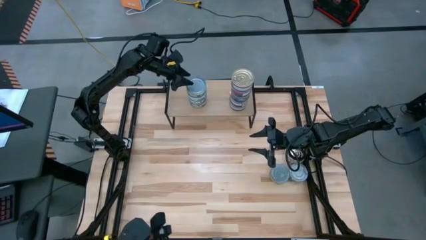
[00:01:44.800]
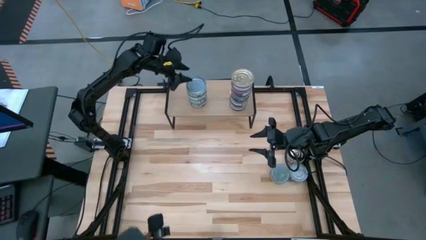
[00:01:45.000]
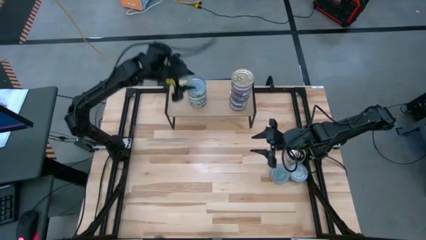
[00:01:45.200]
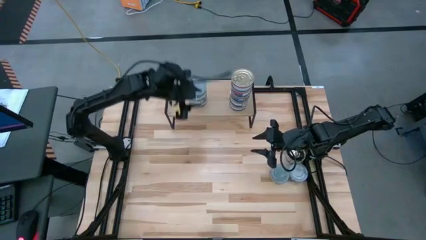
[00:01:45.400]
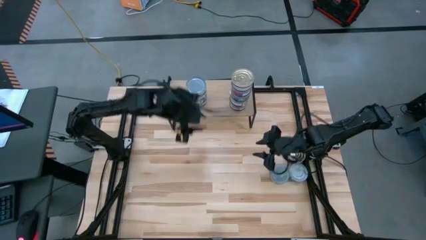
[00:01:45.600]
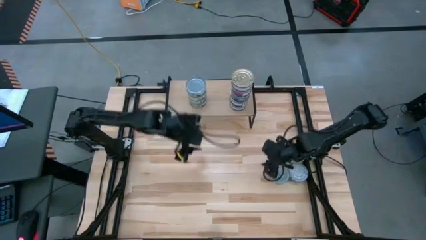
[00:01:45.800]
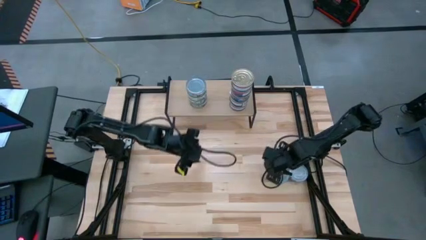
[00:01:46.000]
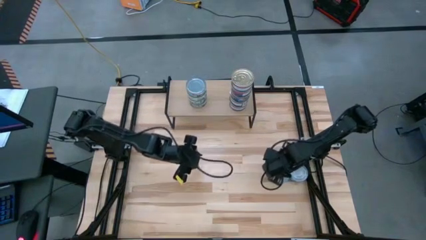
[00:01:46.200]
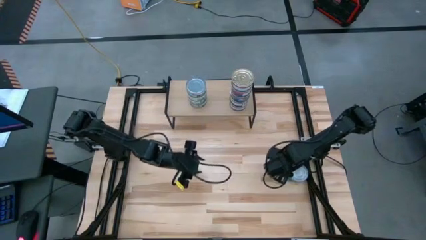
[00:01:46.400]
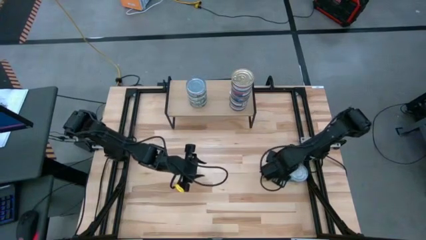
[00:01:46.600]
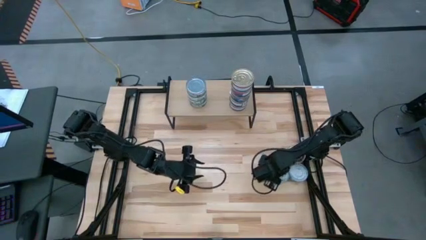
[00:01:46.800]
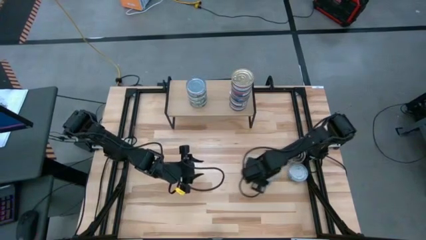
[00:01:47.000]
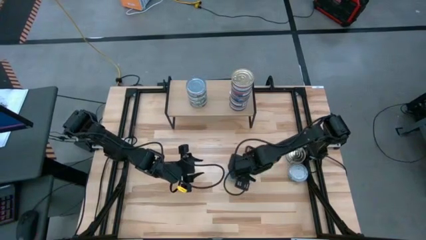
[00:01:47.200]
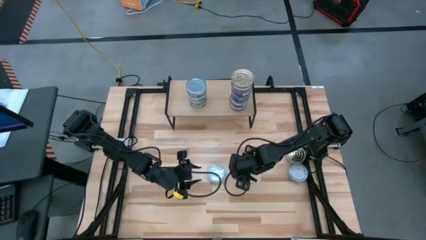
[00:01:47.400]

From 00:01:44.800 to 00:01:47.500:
Task: Stack canned seafood by type on shelf
Move the green tuna can to the center of the table

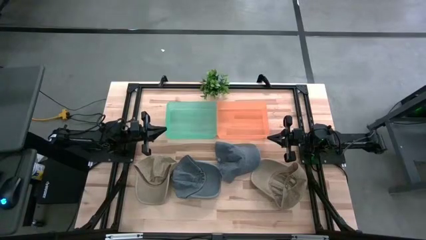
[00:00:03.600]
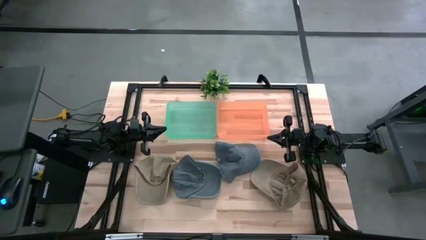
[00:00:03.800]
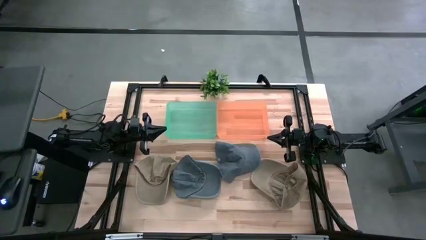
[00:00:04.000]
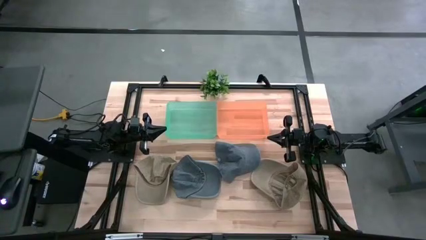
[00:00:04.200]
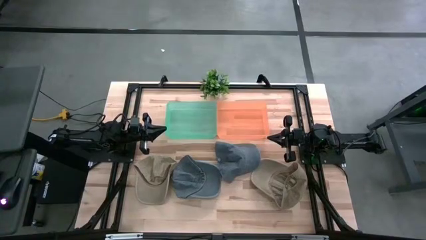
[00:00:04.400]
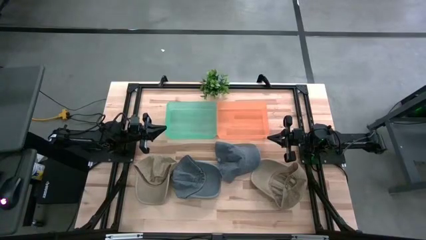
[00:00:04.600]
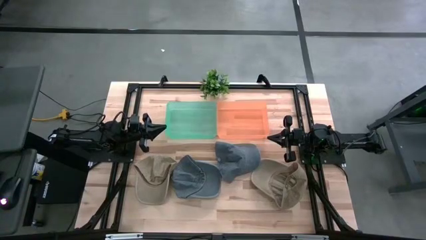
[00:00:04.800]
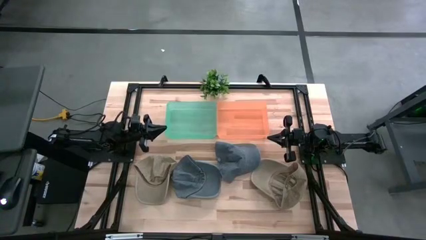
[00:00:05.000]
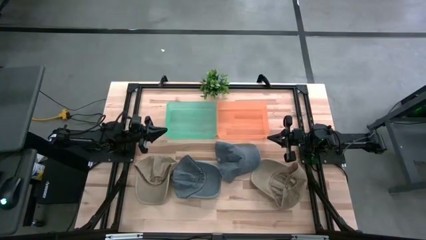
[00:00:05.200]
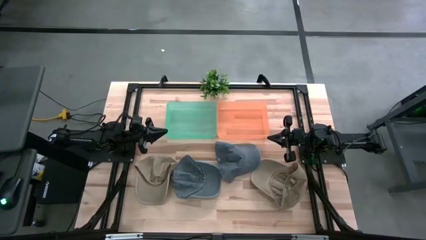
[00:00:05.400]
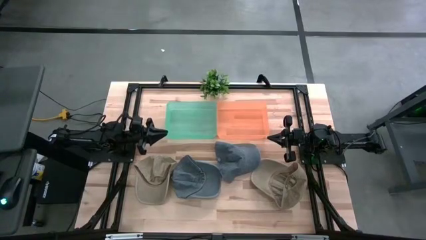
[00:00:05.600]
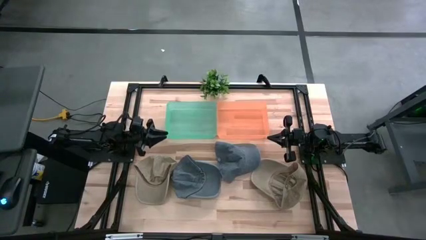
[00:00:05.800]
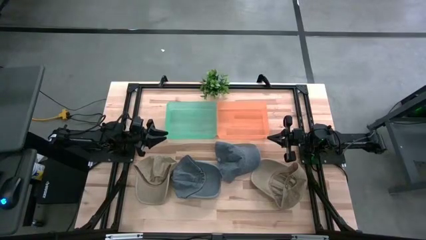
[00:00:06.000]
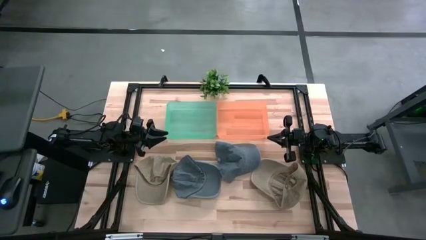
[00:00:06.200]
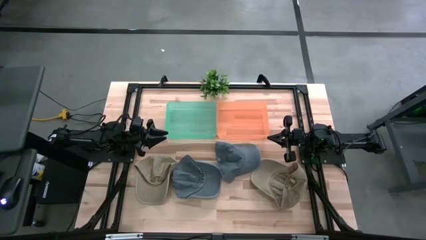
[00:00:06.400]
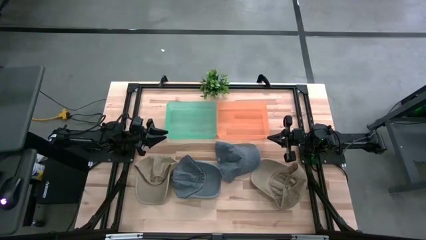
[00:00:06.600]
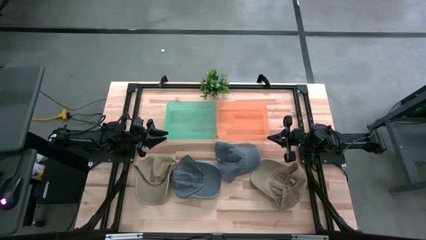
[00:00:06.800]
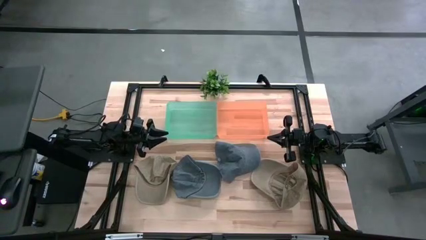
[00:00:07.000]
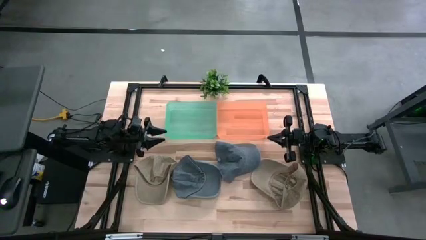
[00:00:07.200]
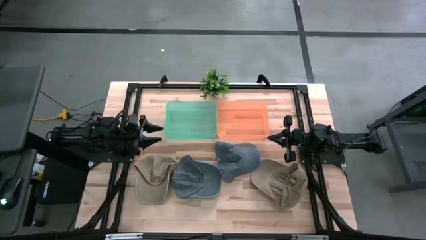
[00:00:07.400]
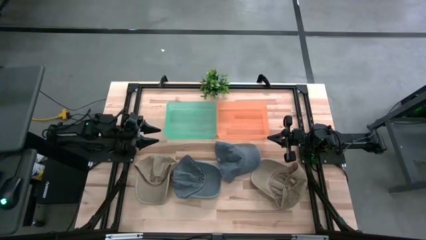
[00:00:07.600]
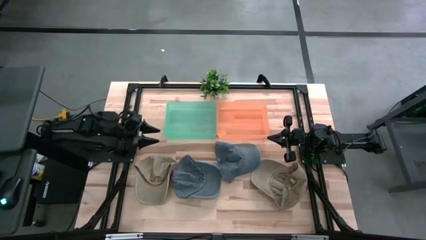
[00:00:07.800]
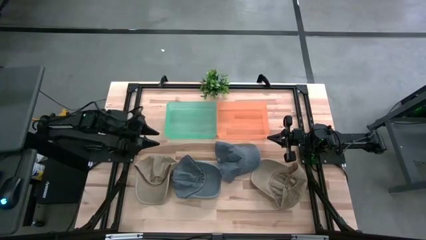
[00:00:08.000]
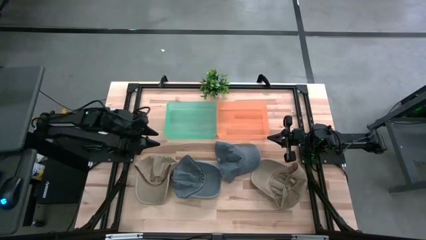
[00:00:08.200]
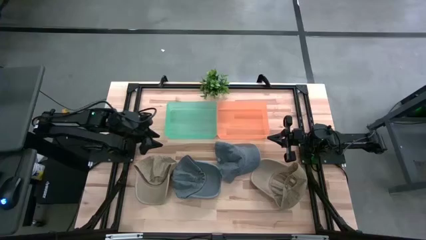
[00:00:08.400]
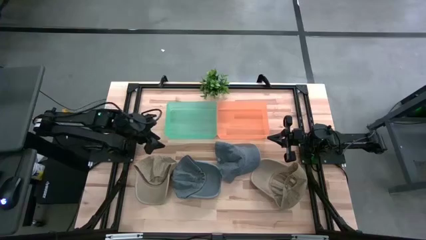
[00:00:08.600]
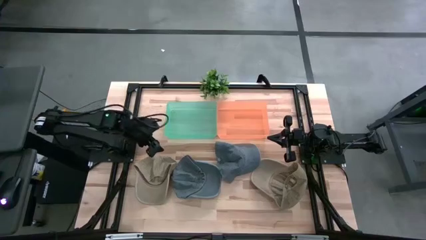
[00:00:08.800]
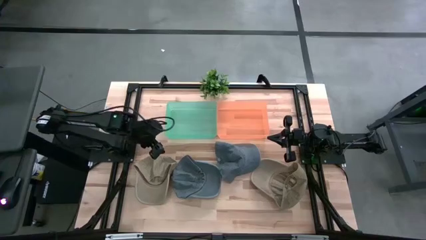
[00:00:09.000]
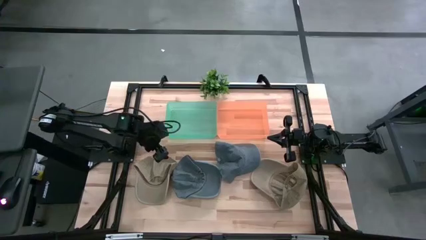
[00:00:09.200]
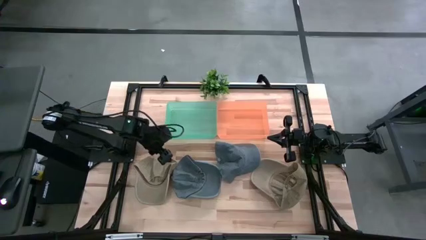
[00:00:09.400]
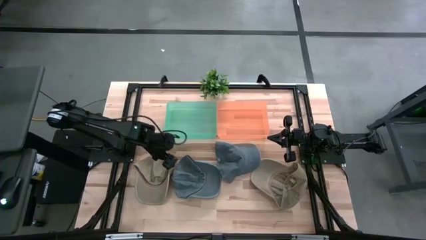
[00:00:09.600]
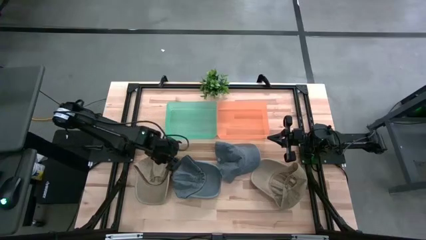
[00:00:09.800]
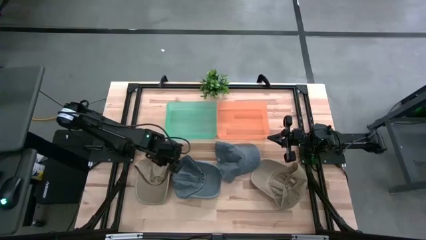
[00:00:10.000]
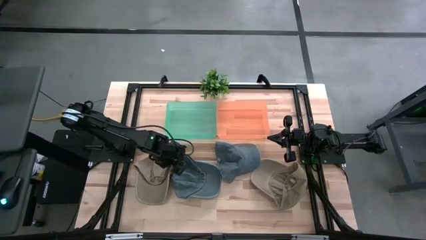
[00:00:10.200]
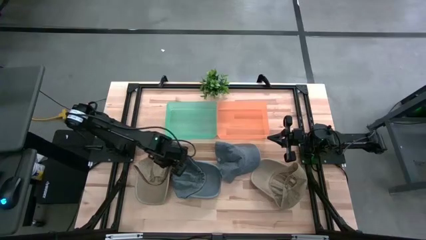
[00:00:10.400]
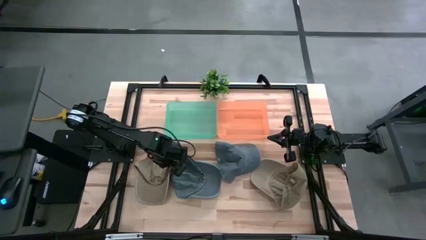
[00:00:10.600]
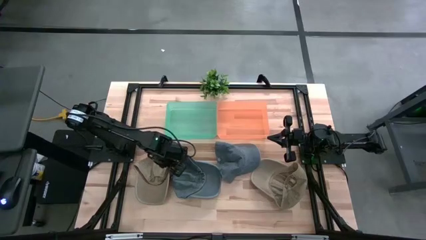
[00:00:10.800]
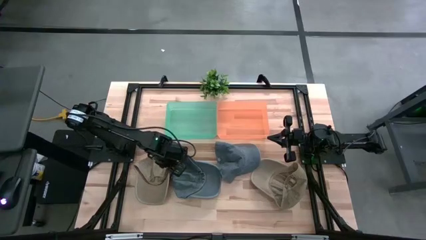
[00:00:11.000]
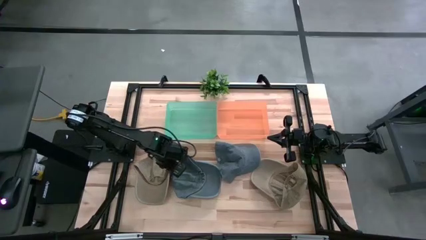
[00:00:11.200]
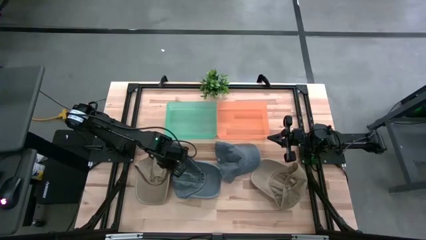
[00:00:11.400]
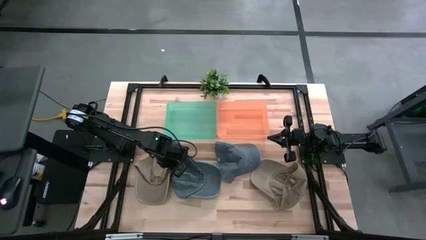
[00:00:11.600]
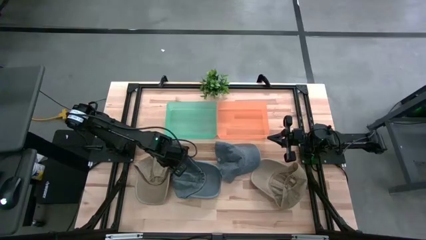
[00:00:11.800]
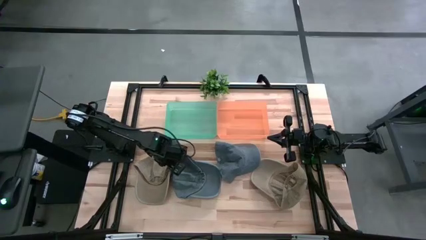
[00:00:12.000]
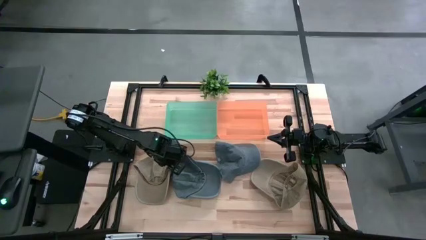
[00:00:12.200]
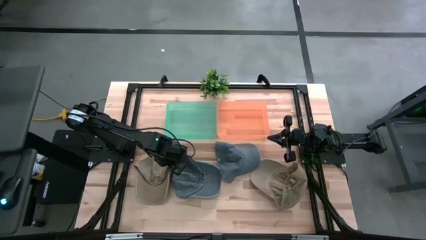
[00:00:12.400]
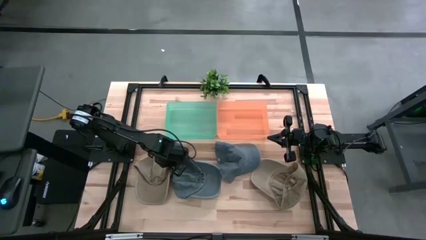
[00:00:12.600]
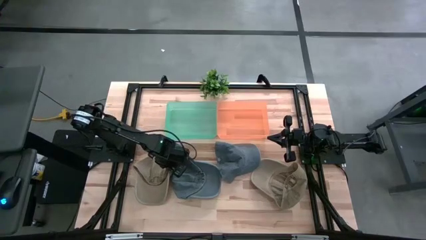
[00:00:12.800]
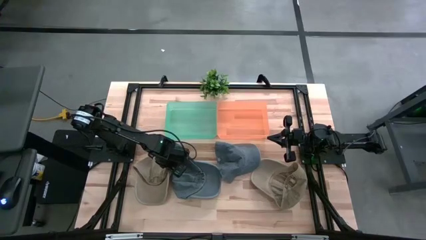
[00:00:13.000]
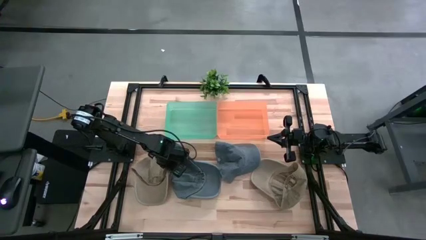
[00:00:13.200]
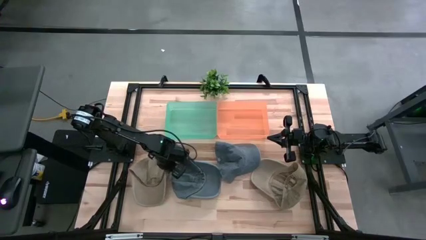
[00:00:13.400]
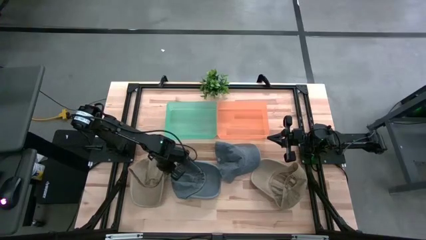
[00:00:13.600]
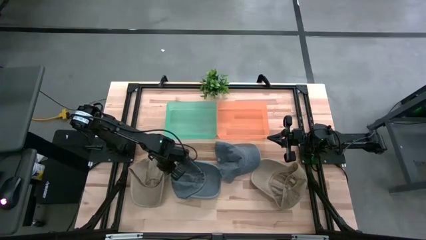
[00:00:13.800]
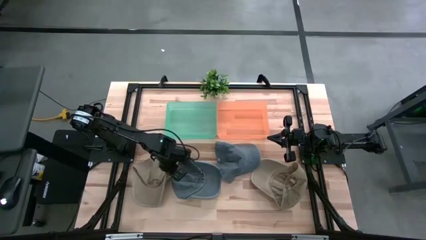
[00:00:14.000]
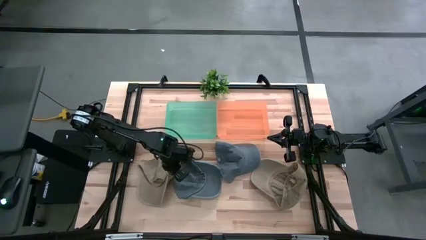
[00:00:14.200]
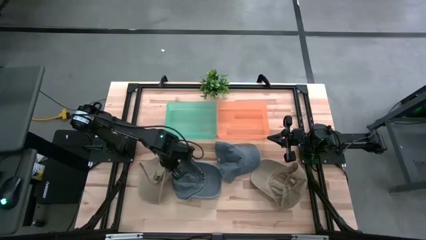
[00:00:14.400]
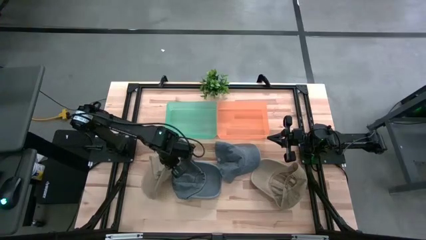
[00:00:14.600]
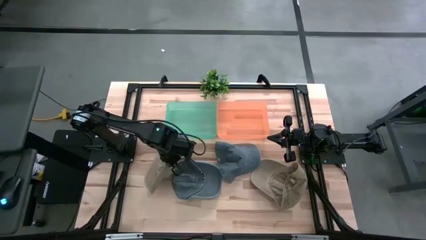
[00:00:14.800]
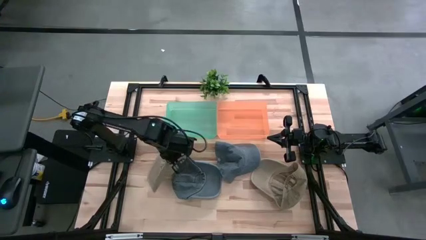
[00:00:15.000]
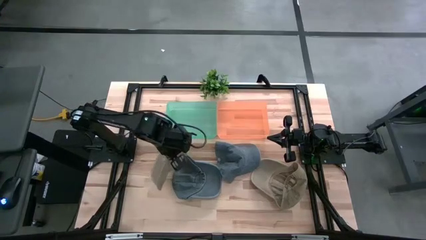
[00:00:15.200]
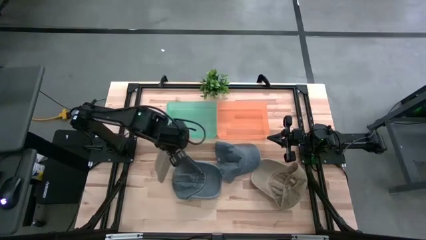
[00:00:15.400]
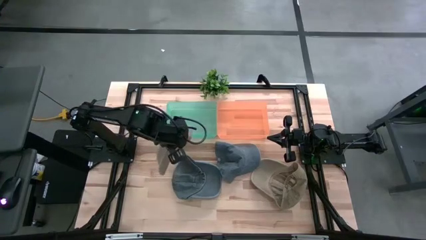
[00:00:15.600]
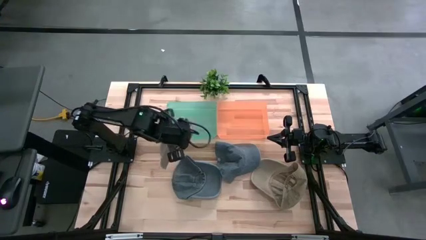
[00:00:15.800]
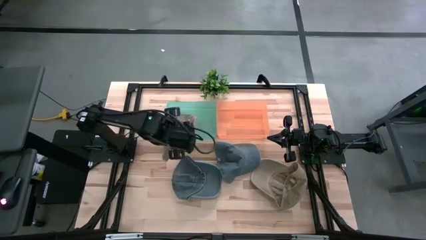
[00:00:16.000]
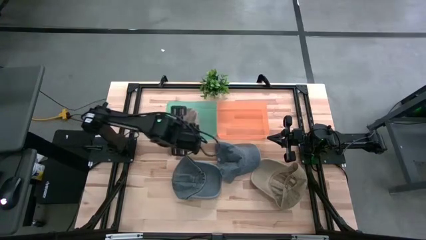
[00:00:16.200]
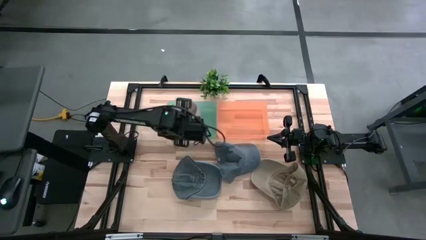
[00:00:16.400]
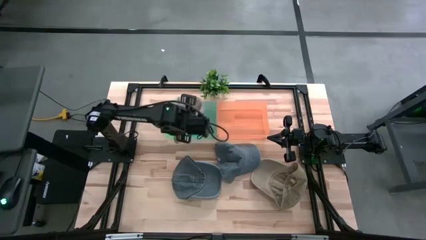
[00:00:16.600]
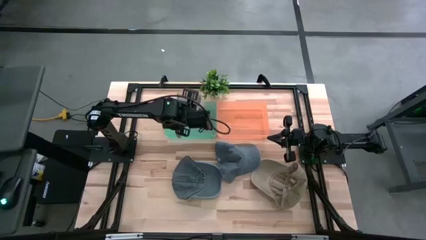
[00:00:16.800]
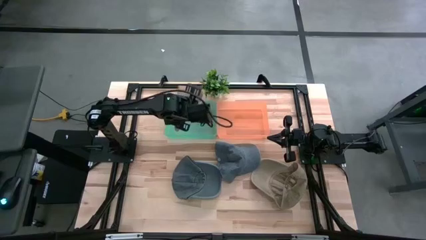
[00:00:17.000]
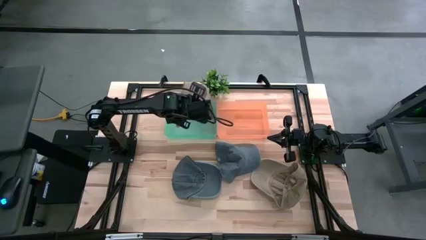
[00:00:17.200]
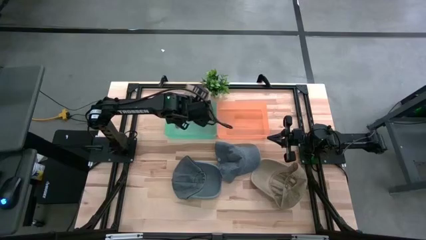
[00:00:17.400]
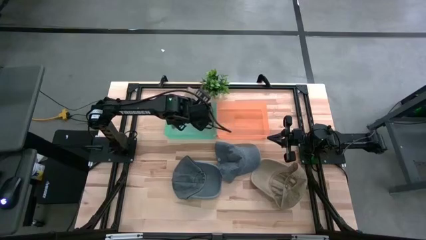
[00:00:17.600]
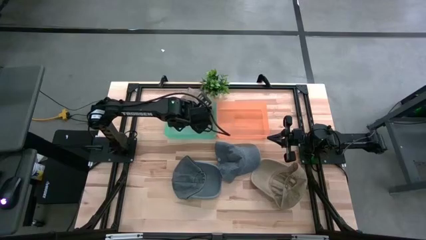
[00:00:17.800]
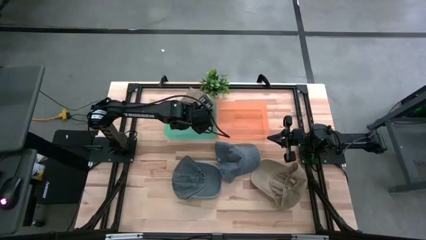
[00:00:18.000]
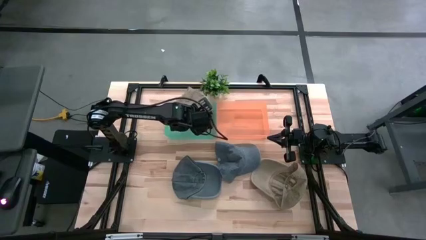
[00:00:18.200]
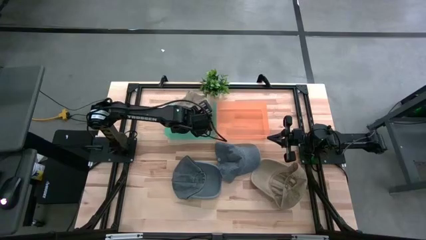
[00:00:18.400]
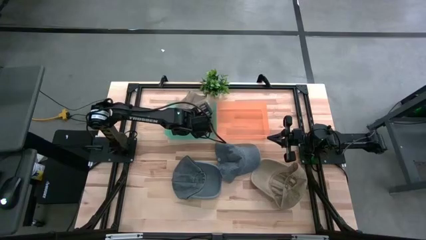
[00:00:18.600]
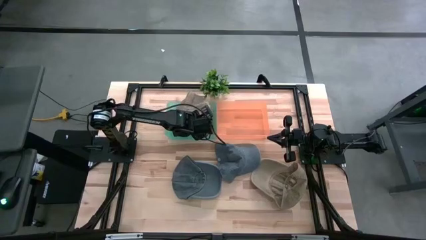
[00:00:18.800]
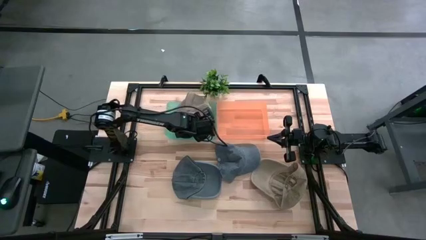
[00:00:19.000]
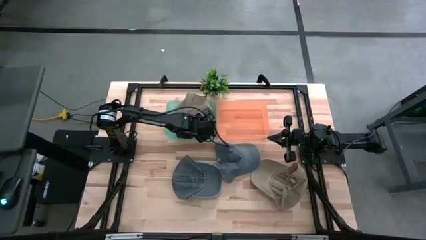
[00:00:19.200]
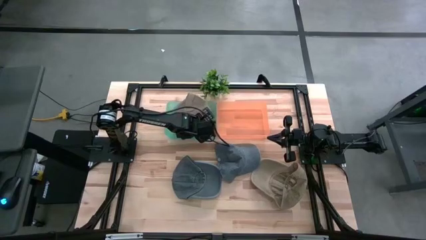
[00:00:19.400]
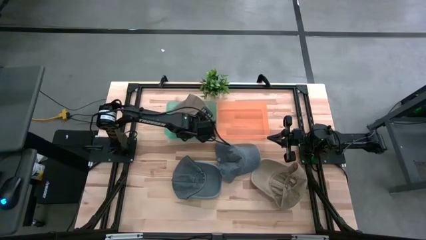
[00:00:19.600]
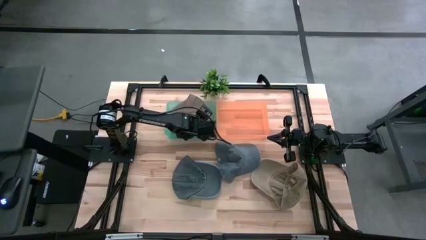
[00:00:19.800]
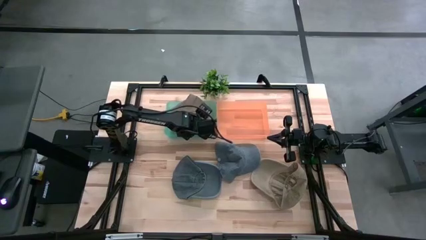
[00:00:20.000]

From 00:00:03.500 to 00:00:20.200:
Task: Pick & Place hat
Put the left brown cap into the light green bin
